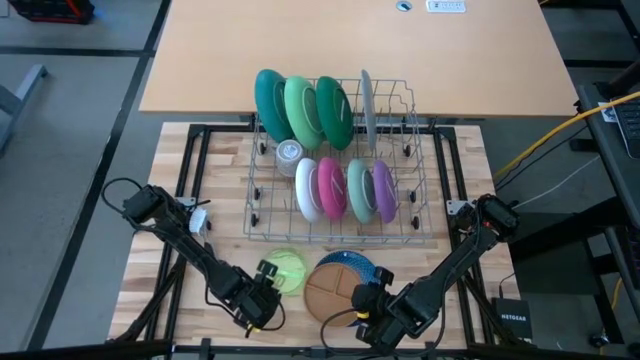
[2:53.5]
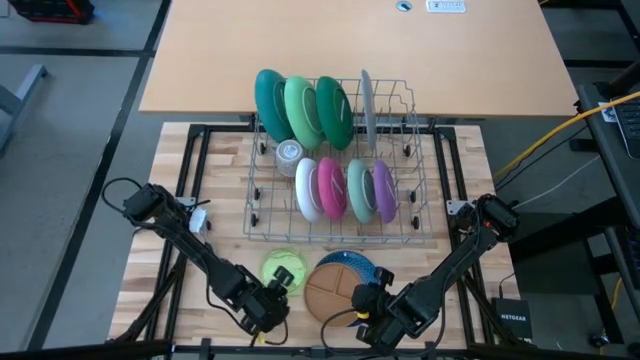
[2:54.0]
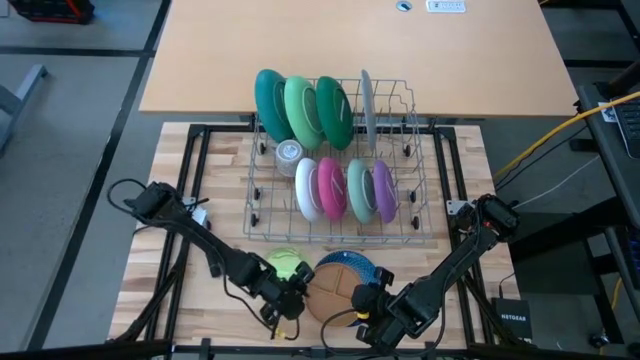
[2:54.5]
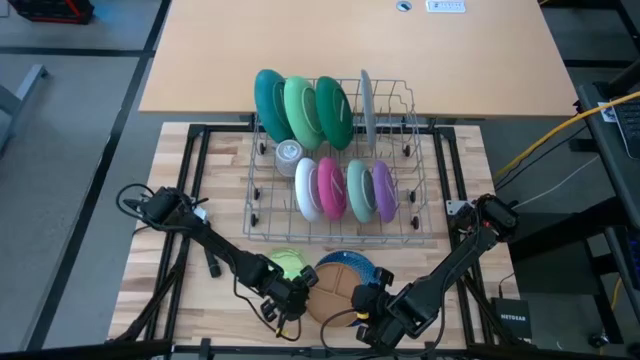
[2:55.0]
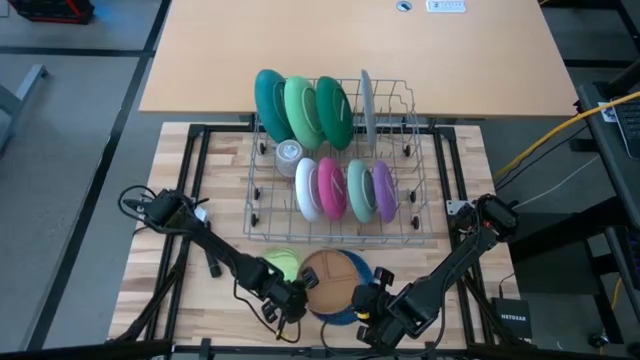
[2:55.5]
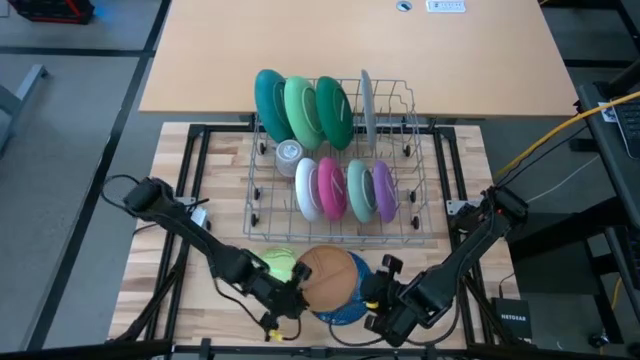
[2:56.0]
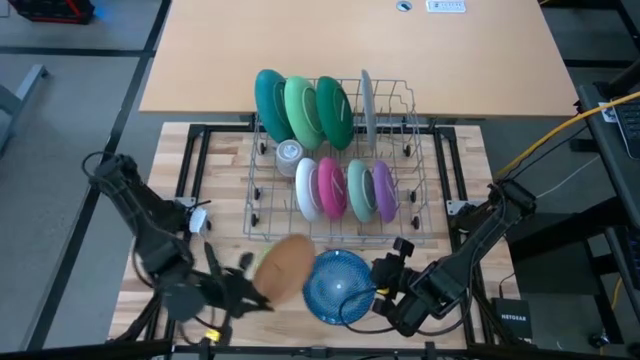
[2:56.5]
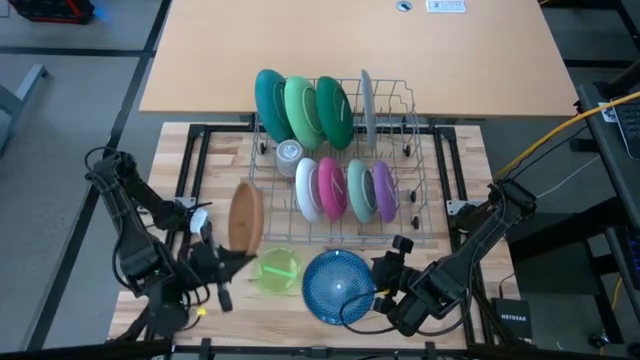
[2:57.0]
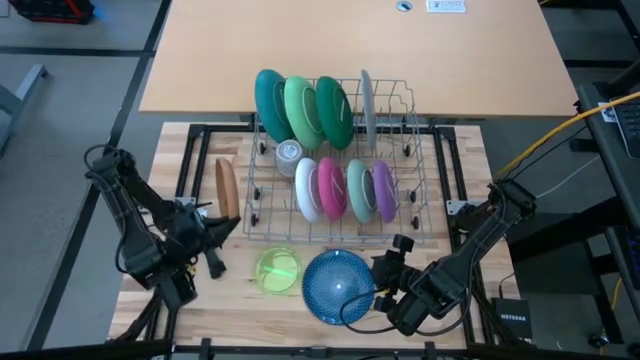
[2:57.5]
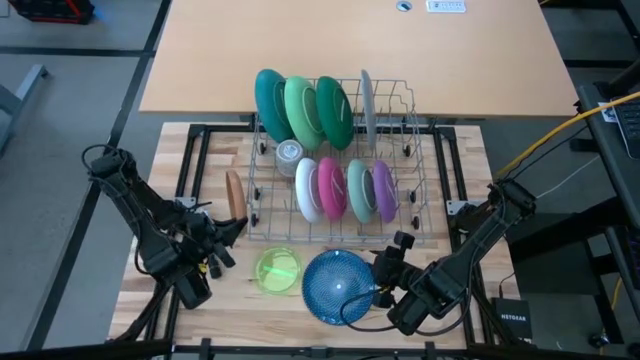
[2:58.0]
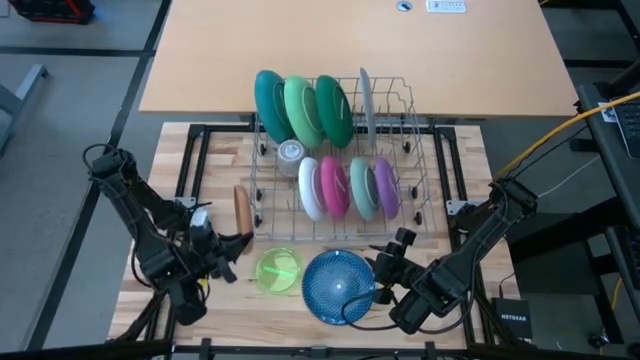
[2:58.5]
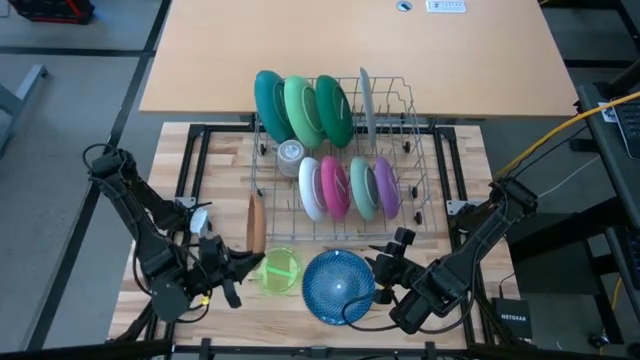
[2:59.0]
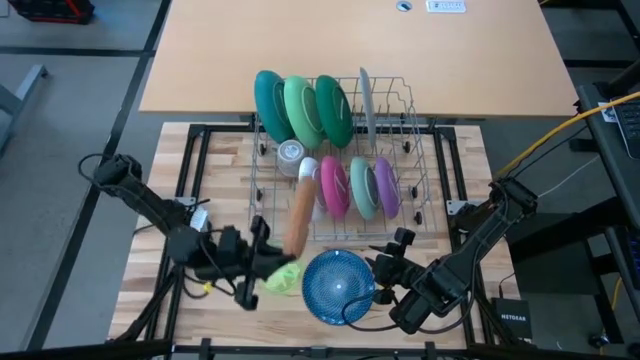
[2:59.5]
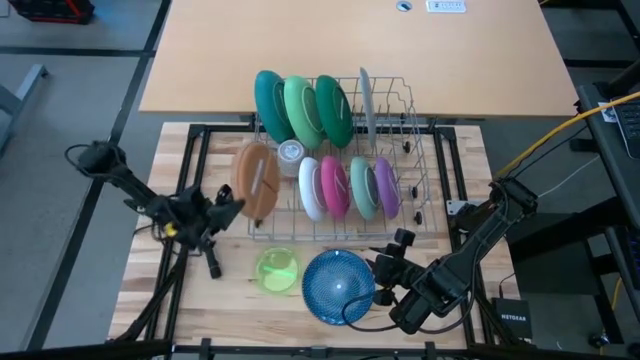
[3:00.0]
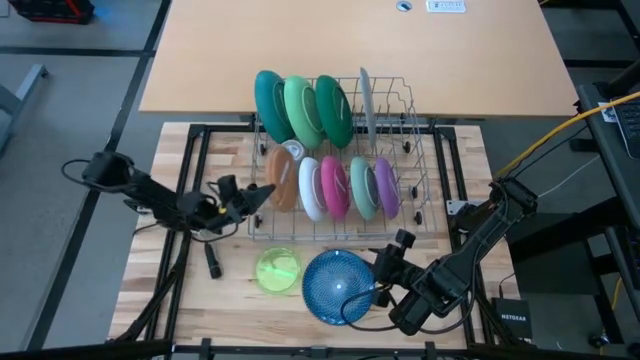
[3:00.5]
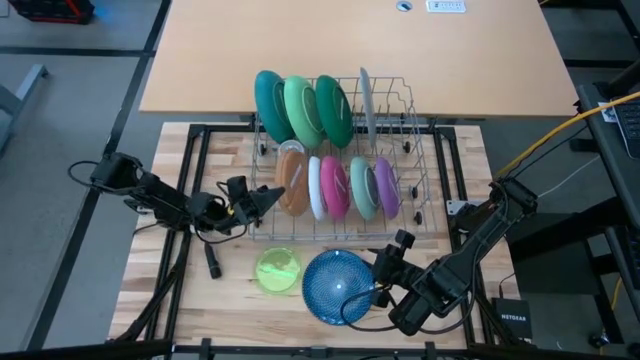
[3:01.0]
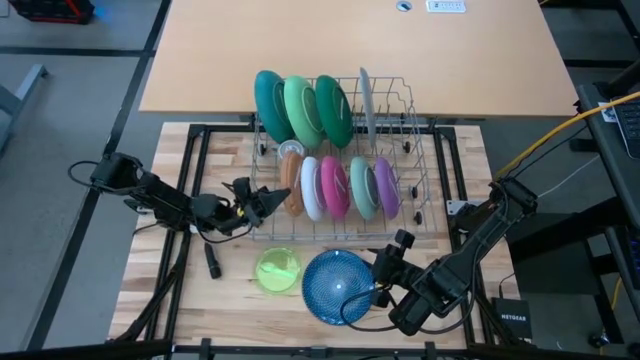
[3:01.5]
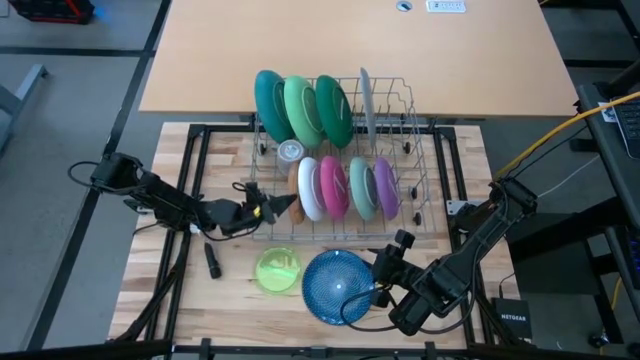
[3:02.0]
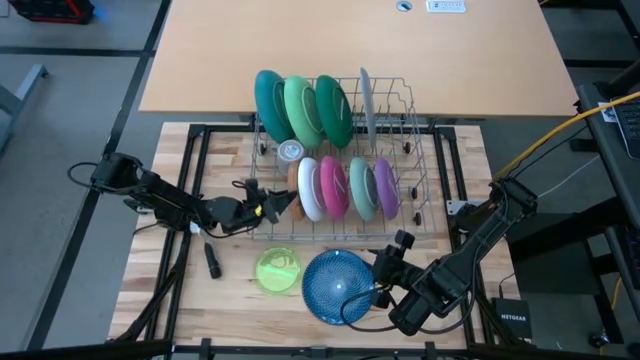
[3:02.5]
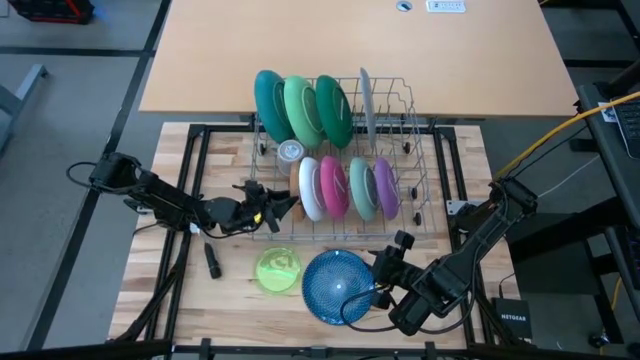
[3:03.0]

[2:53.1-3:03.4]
Task: Sort dishes
Put the brown plate in the dish rack

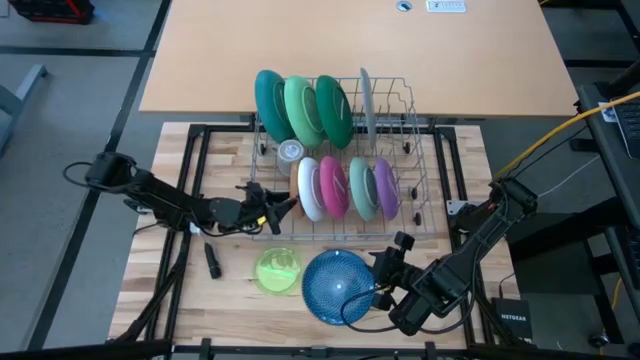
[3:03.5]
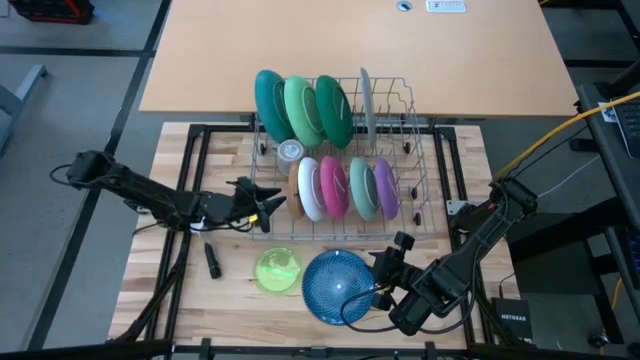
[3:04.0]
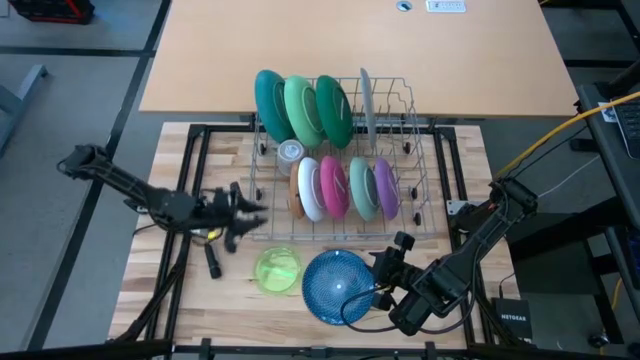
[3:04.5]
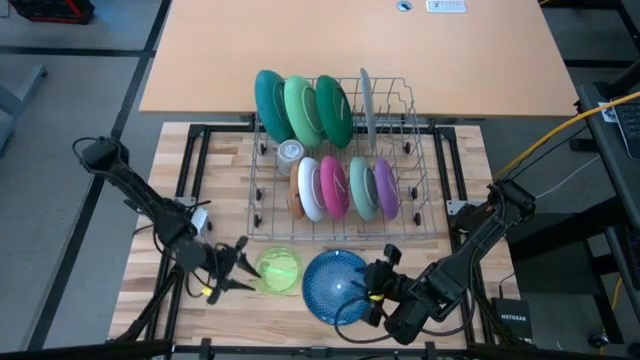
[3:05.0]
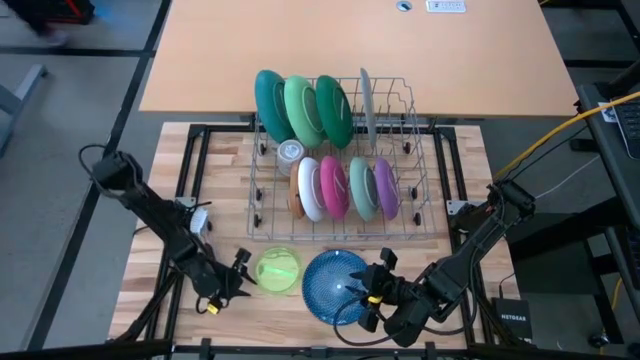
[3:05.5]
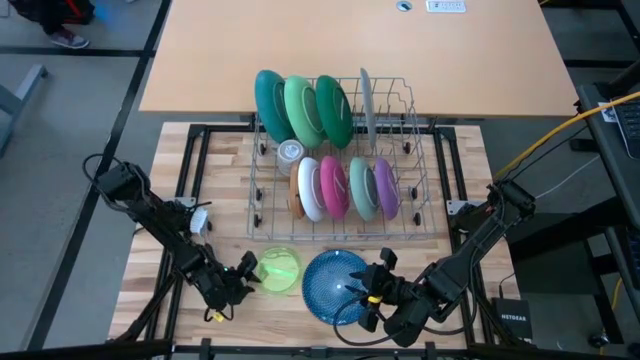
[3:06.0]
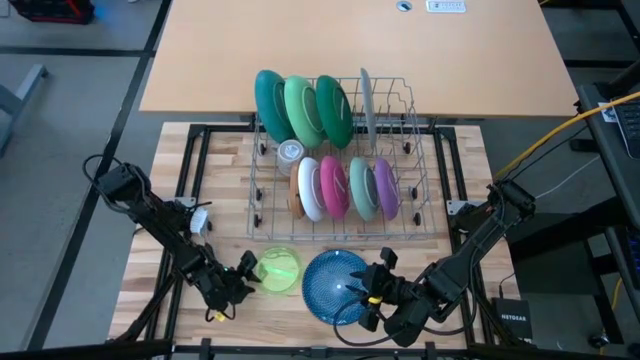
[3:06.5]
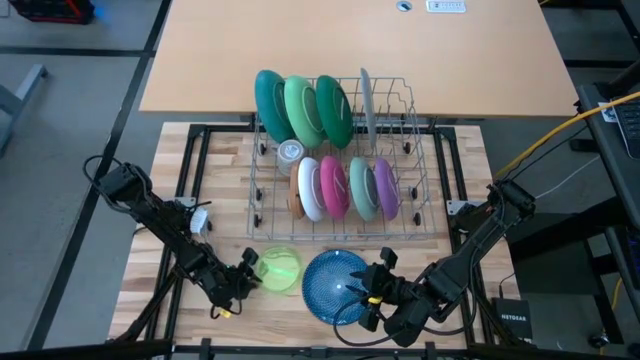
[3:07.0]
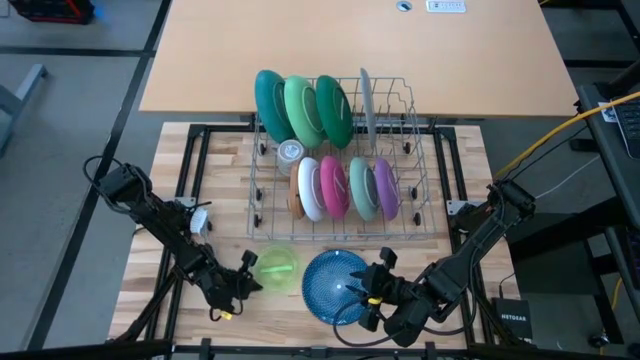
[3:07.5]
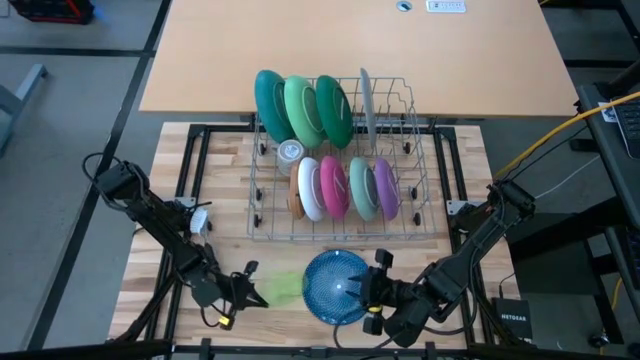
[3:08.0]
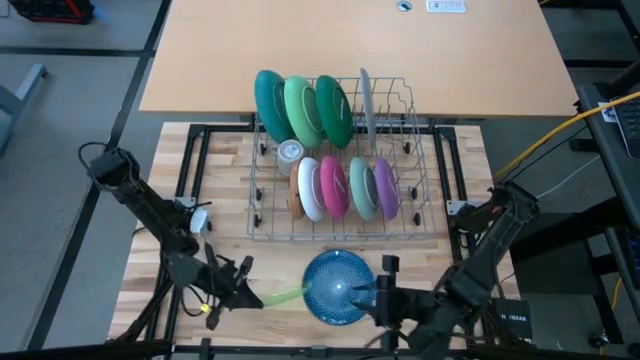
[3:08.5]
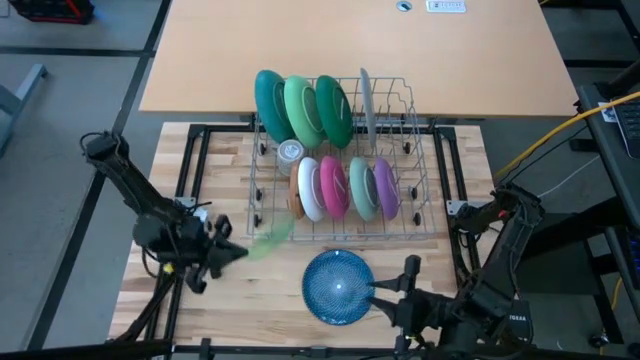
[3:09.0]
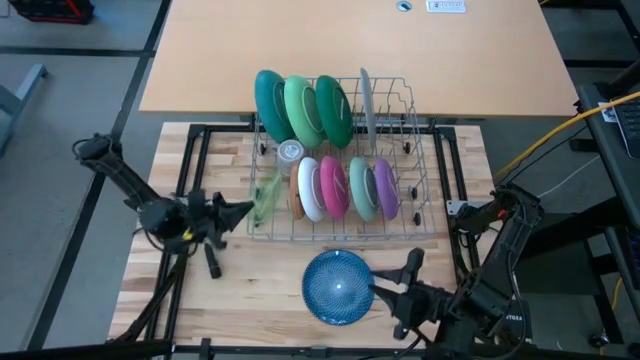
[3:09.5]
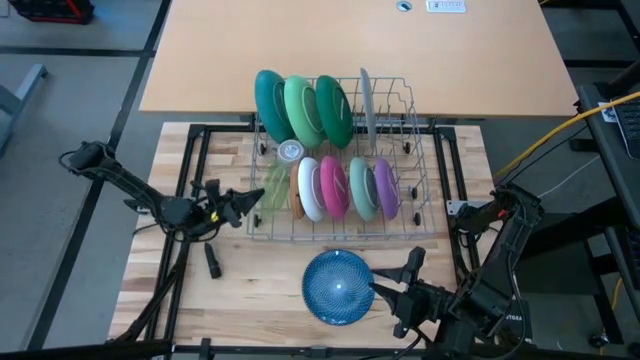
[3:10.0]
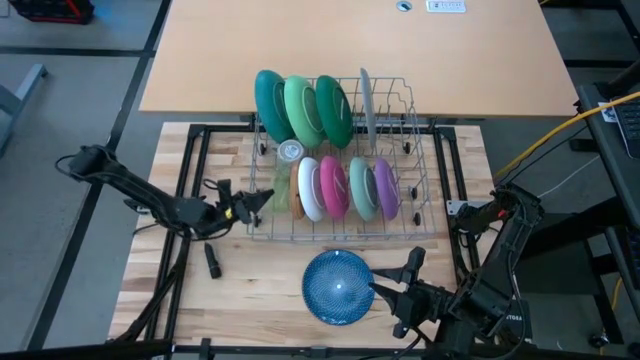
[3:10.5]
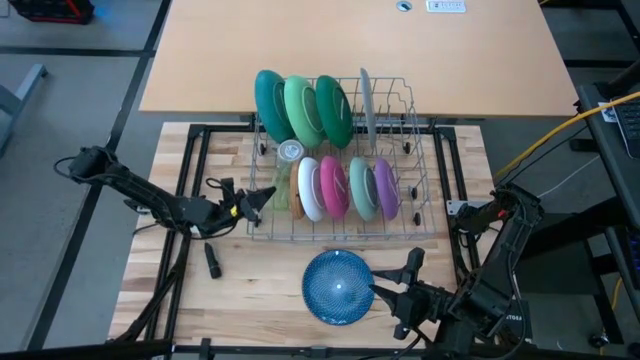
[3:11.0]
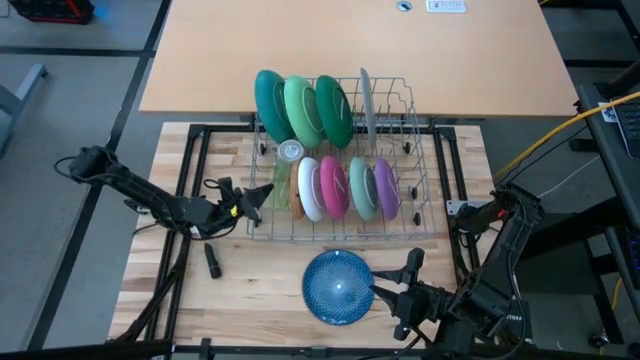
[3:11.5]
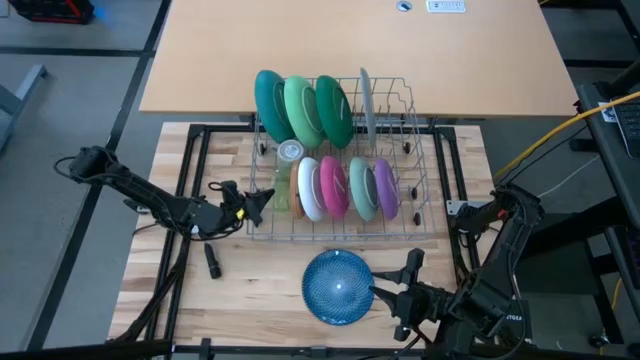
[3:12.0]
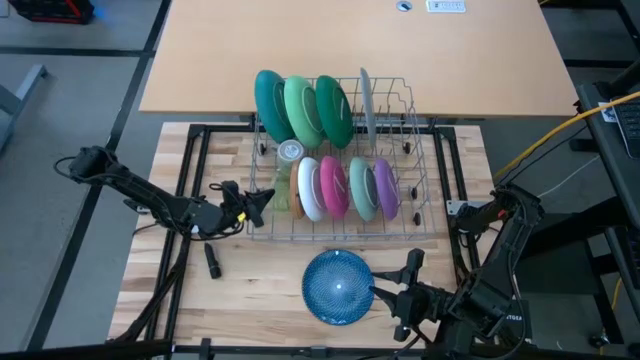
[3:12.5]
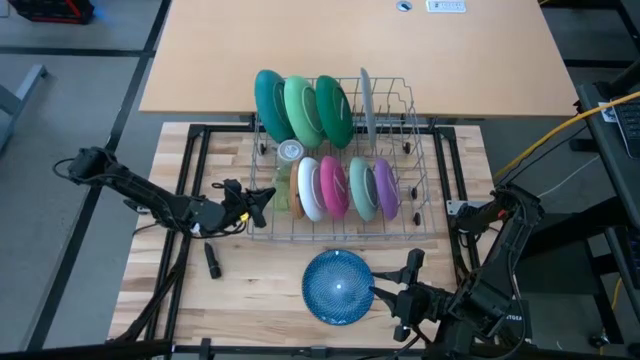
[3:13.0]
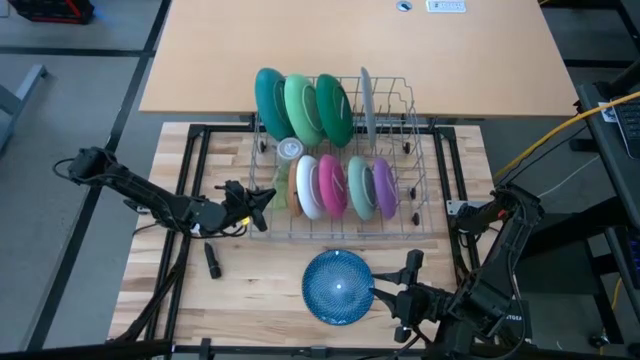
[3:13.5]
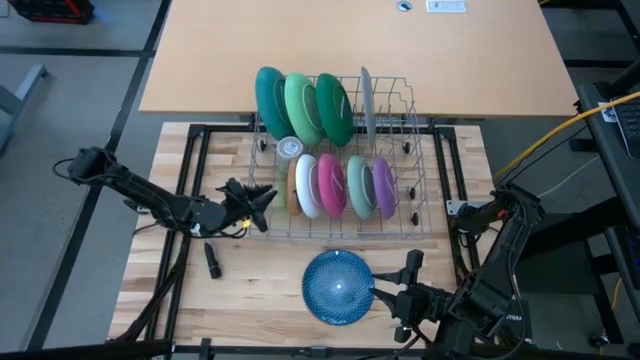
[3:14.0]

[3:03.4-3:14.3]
Put the transparent green plate in the dish rack

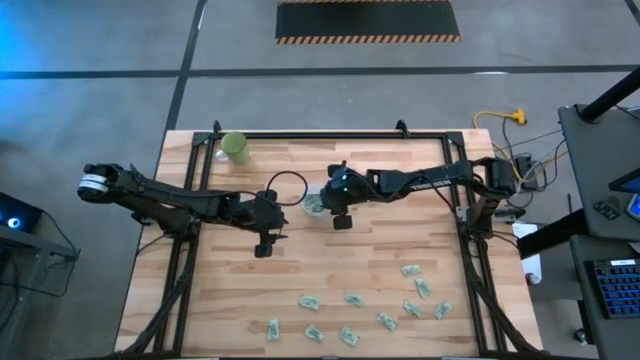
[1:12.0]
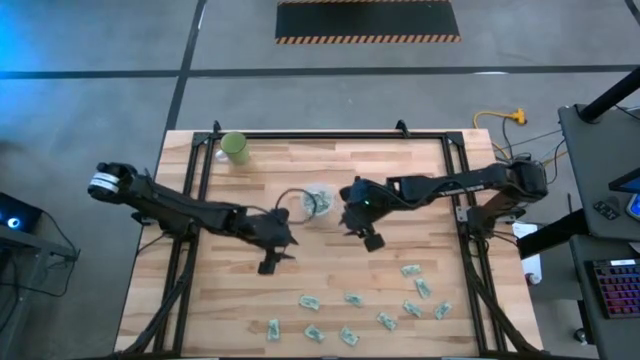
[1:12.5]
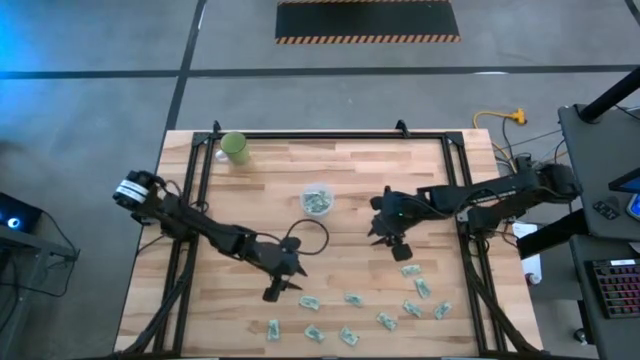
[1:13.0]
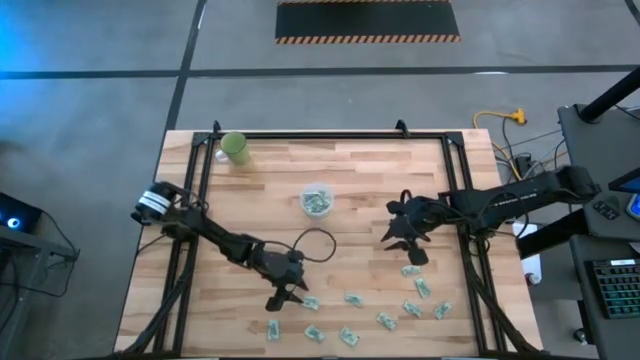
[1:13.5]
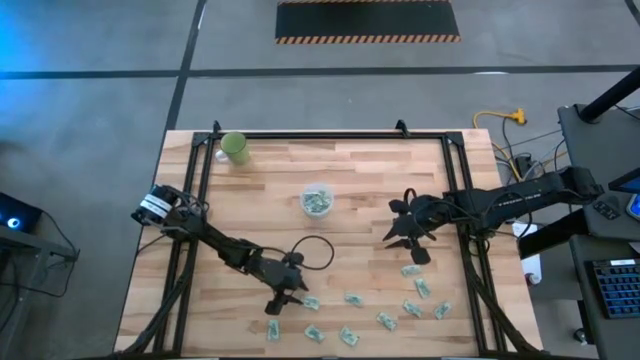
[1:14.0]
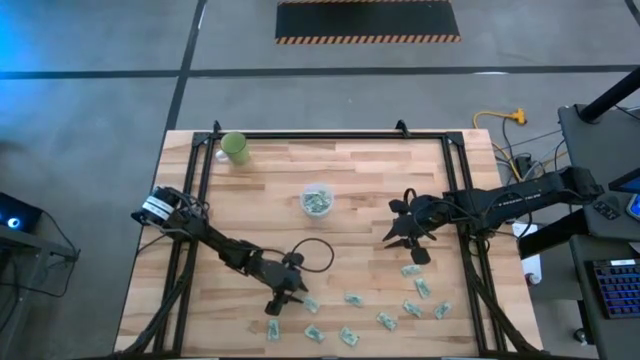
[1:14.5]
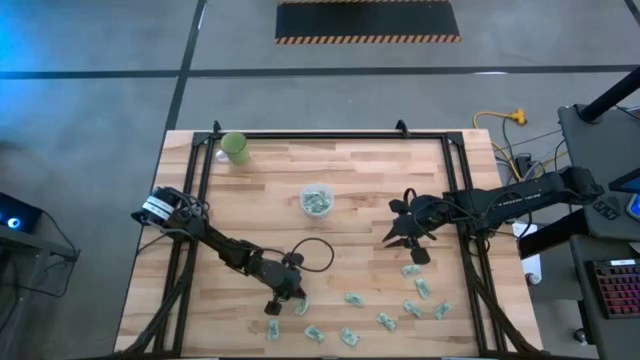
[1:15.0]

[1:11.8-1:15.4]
Task: Pick and place Stevia / Truvia into bins
Put the green stevia packet into the transparent container
